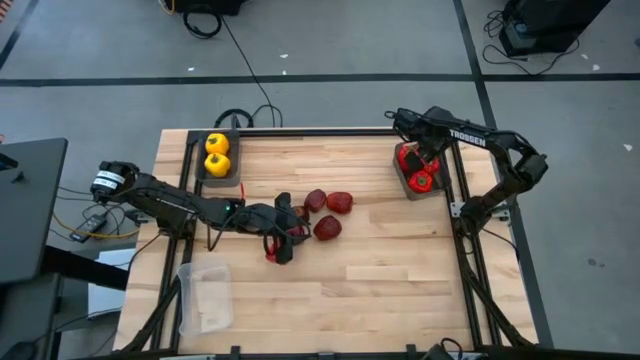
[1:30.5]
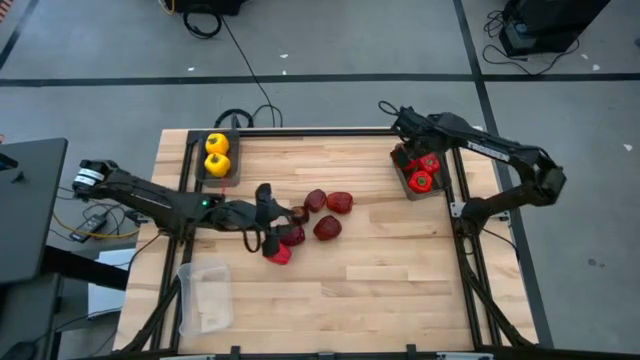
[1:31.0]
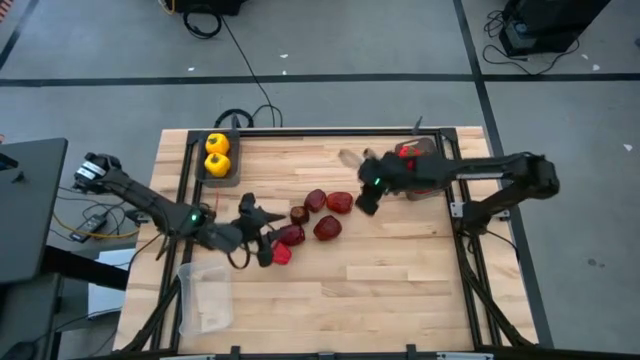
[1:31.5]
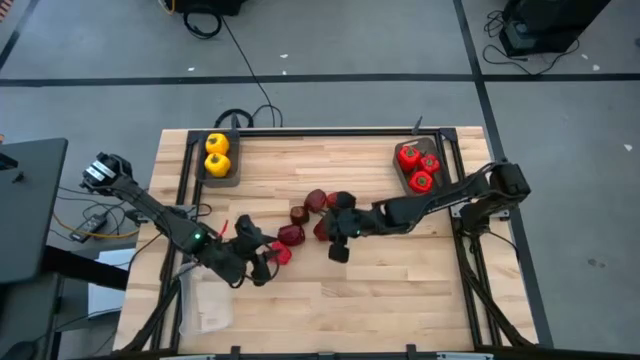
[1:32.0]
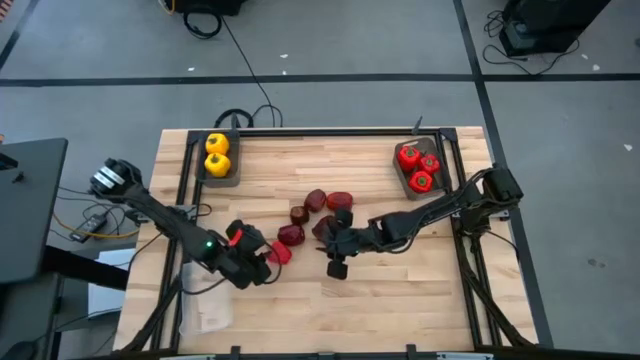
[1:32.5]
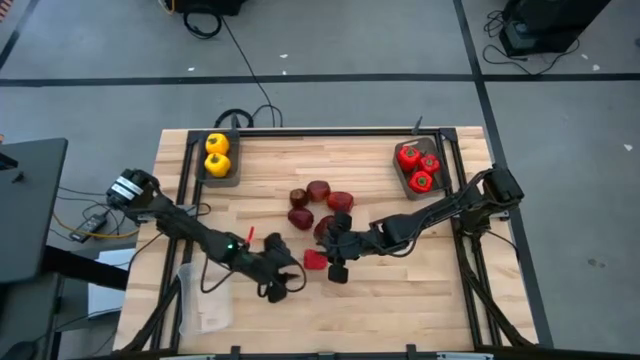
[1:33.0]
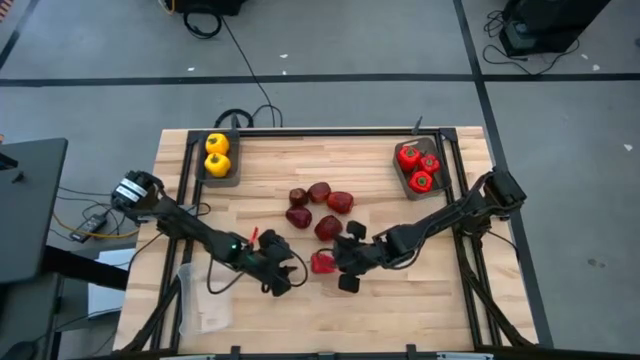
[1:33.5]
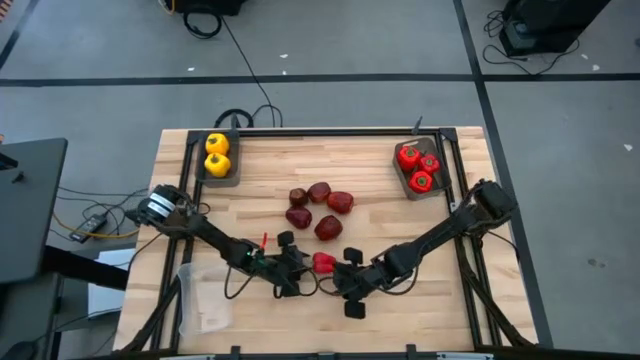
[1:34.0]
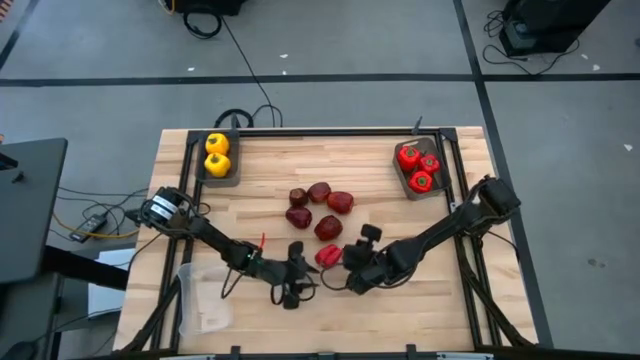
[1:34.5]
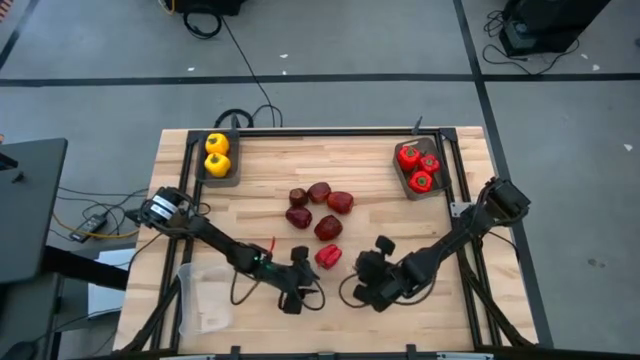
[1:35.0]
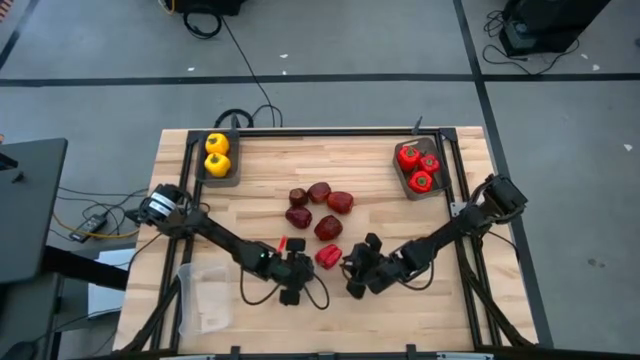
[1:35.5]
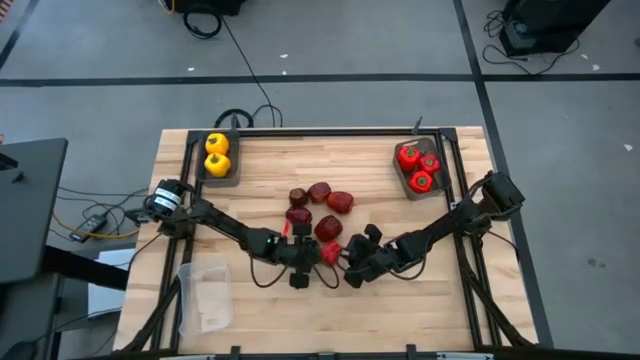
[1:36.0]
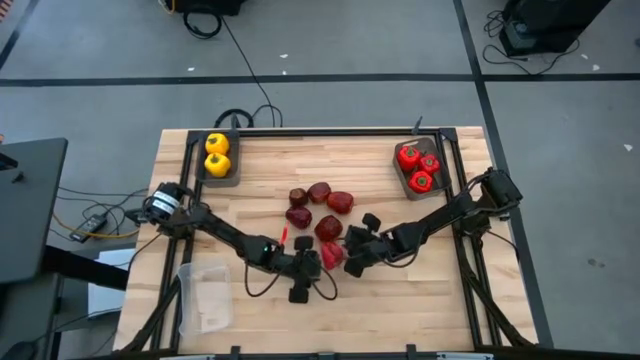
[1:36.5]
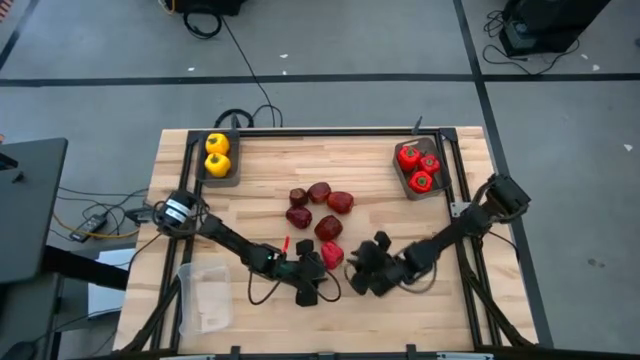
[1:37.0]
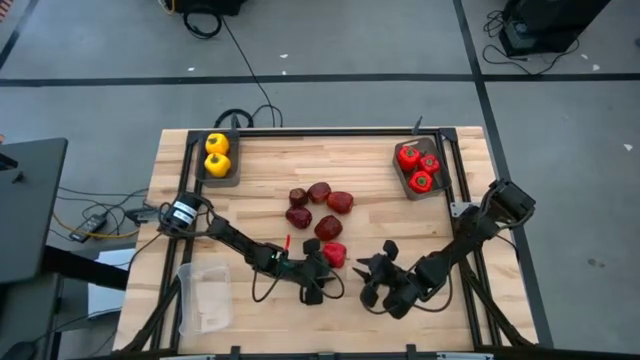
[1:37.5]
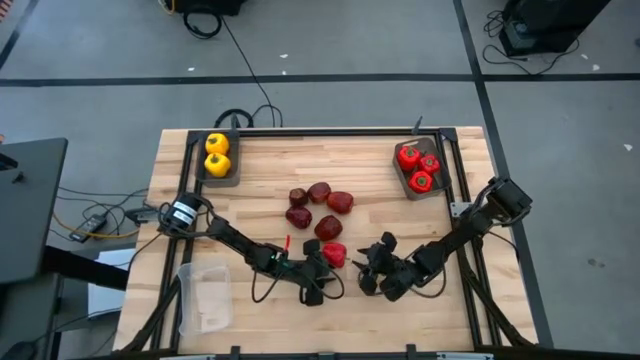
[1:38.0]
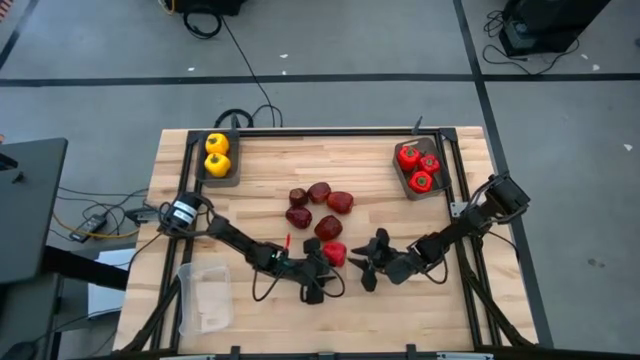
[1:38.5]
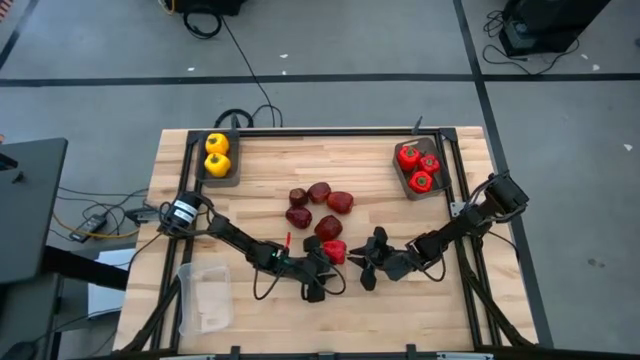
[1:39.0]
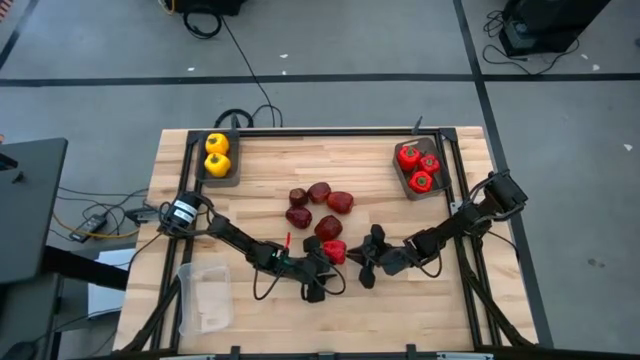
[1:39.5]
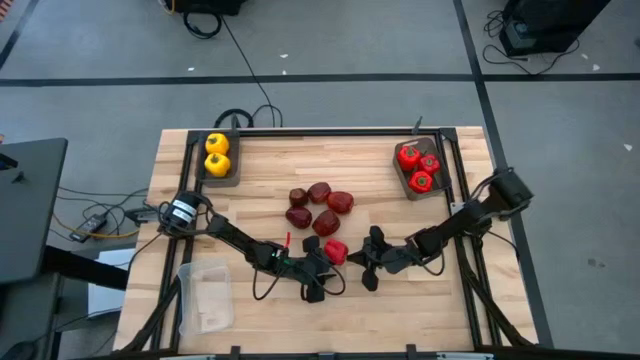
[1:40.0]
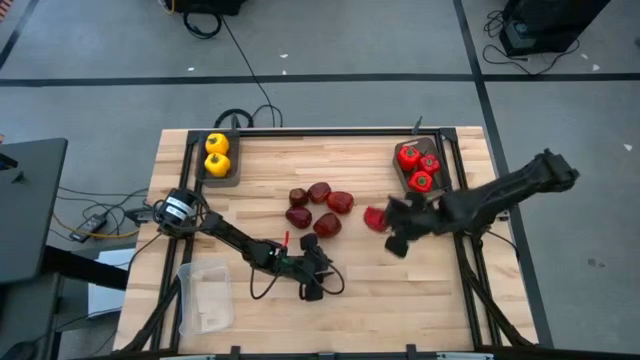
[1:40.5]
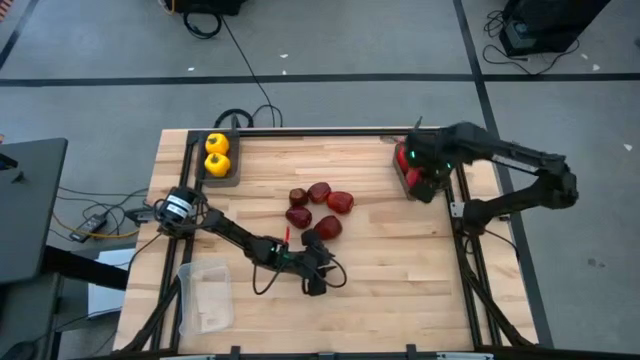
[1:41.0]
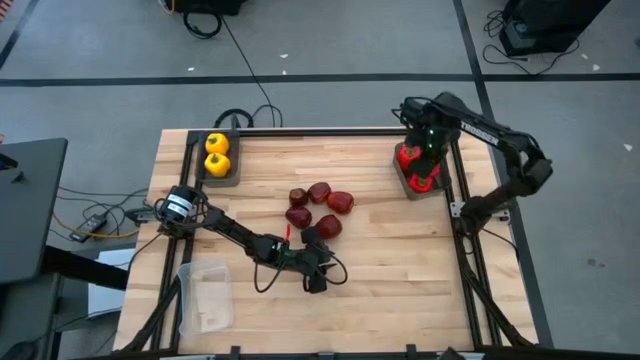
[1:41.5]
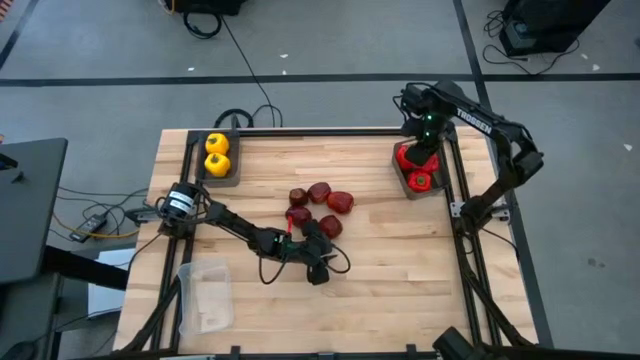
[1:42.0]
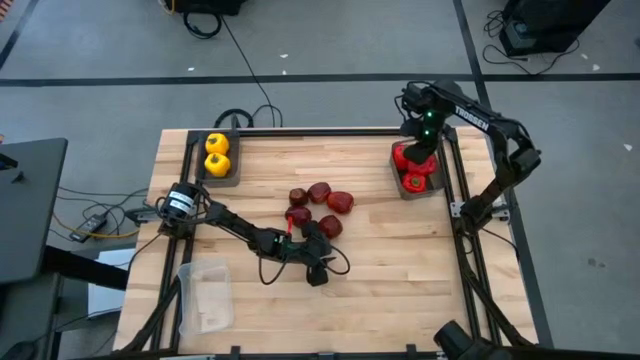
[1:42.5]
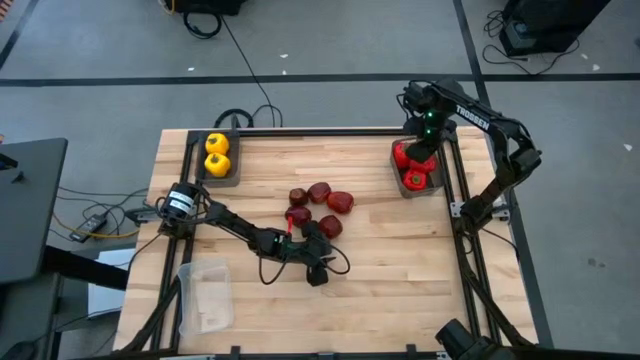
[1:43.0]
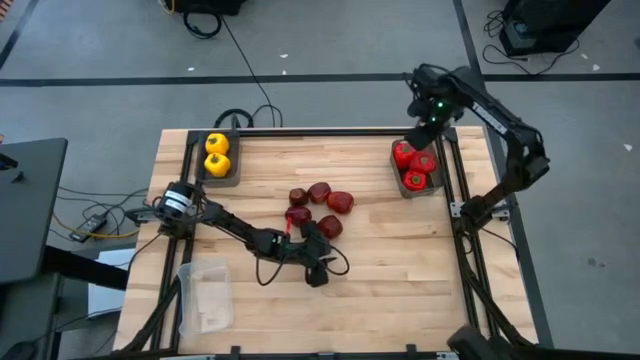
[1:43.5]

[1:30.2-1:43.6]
Task: Sort produce into baskets
Put the red bell pepper into the right black transparent bin

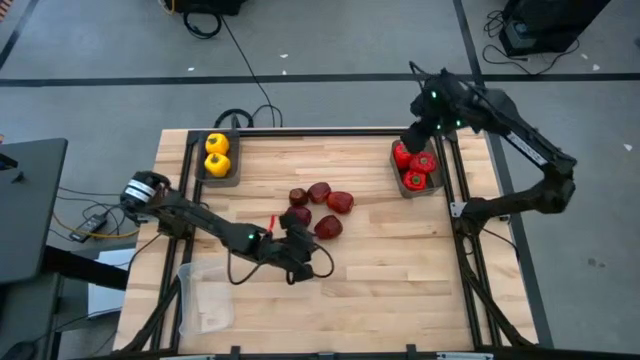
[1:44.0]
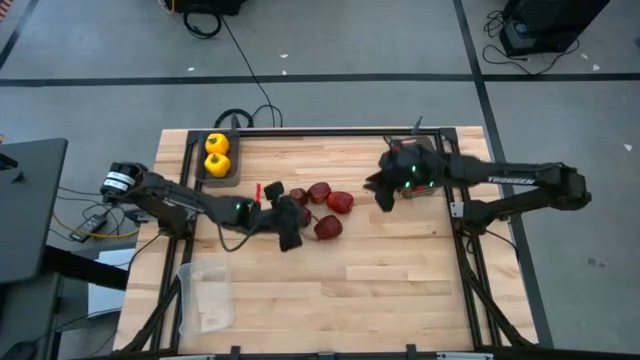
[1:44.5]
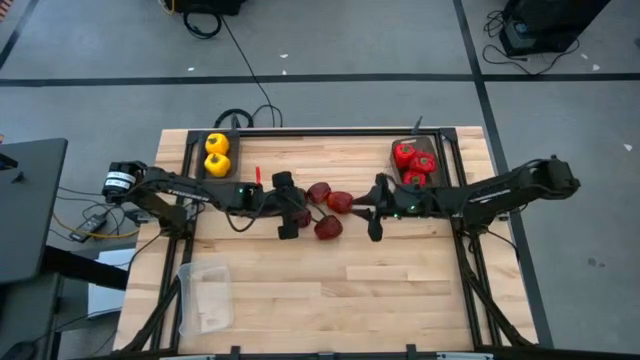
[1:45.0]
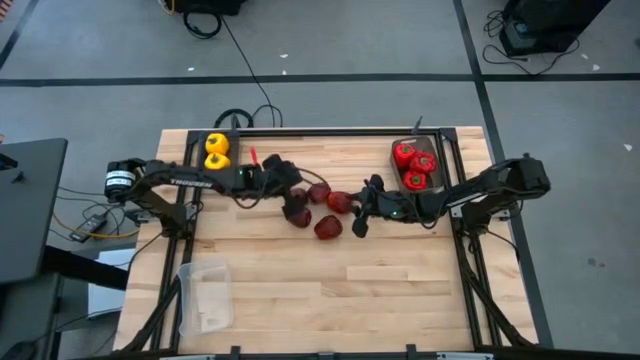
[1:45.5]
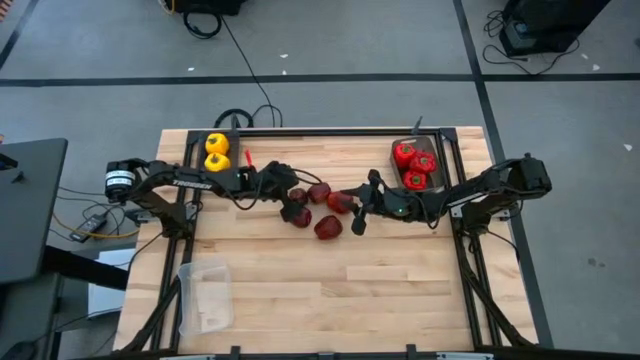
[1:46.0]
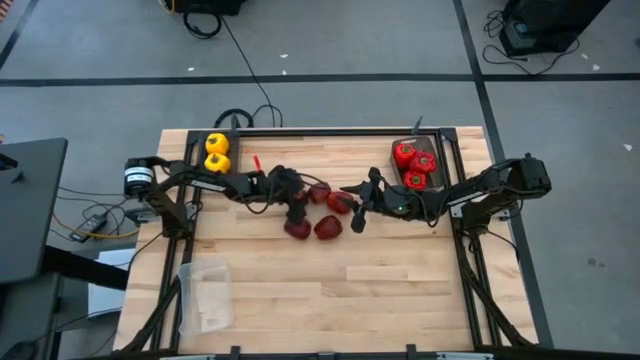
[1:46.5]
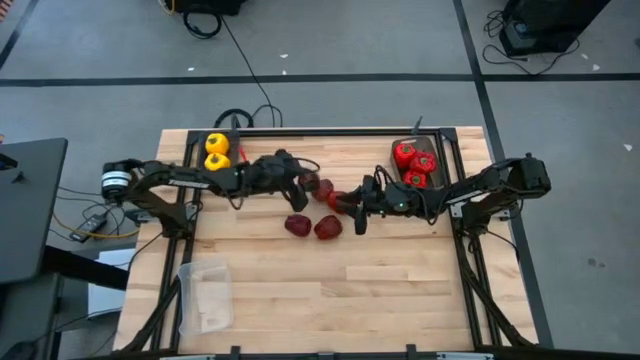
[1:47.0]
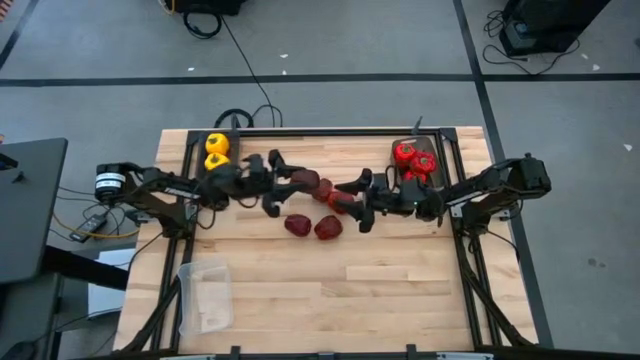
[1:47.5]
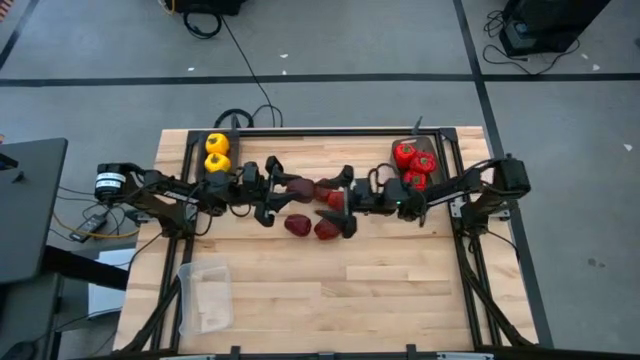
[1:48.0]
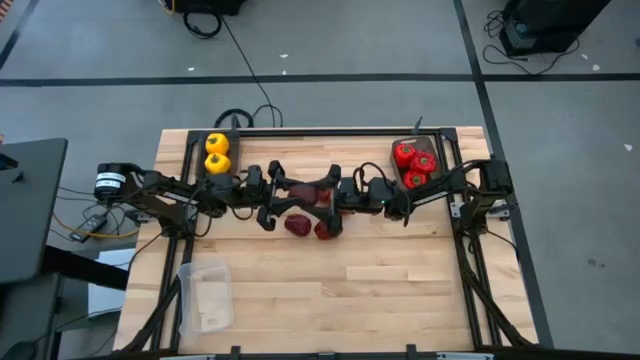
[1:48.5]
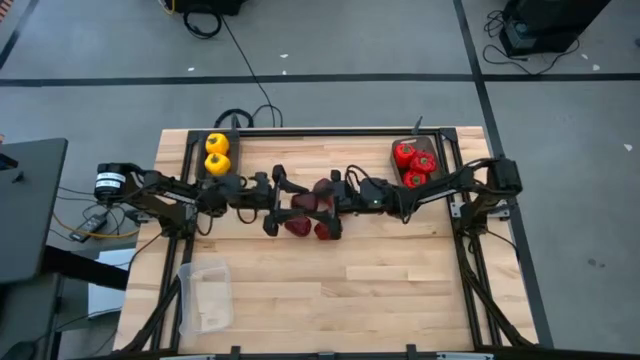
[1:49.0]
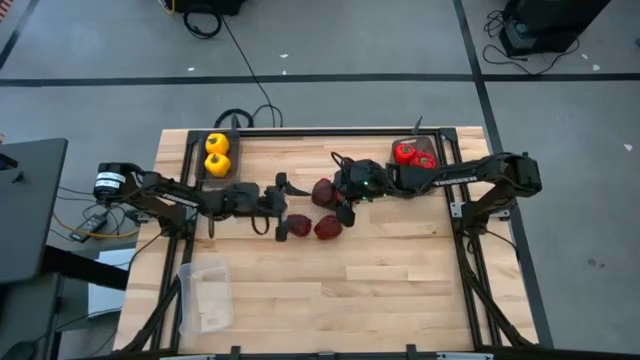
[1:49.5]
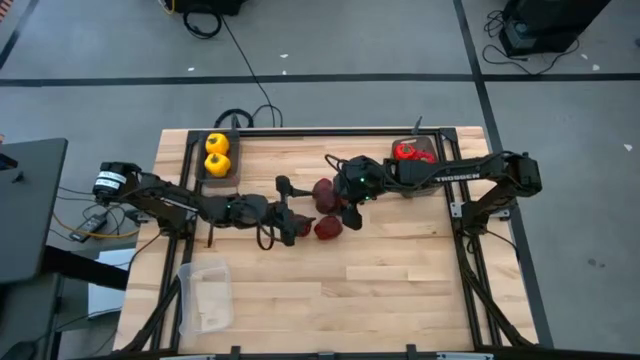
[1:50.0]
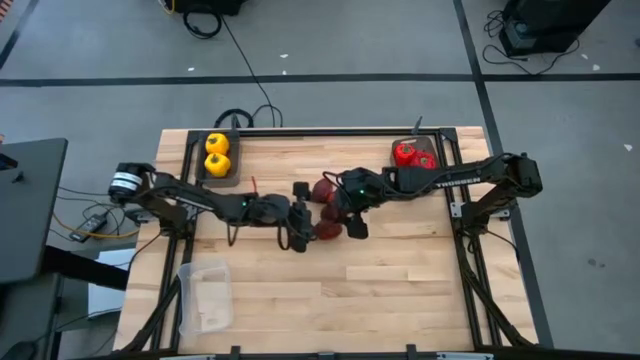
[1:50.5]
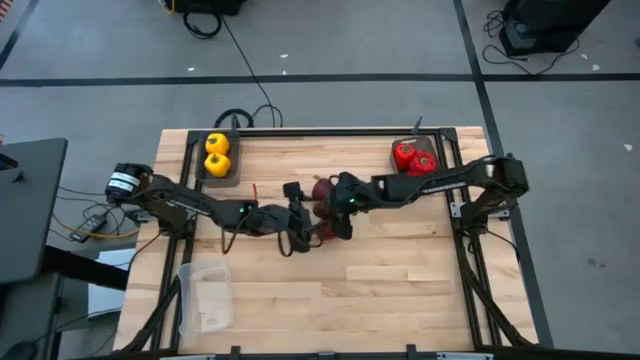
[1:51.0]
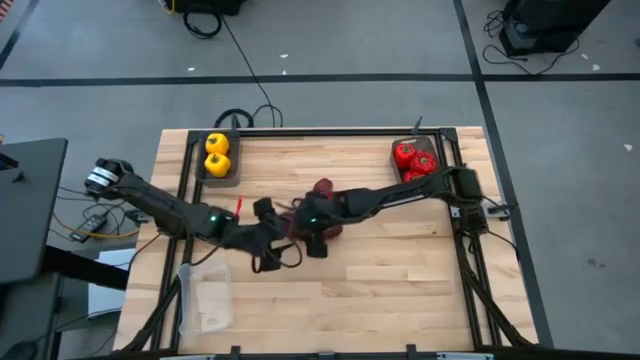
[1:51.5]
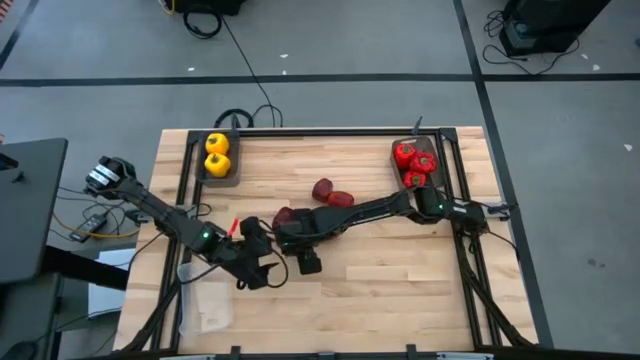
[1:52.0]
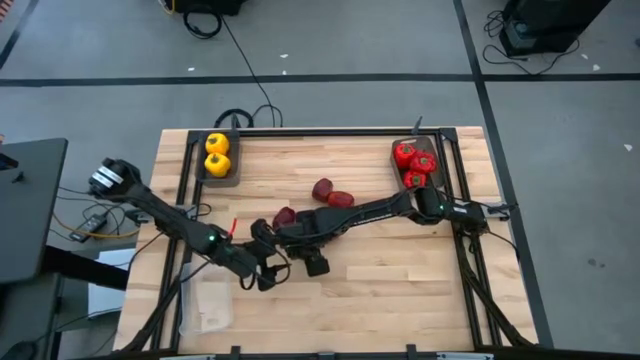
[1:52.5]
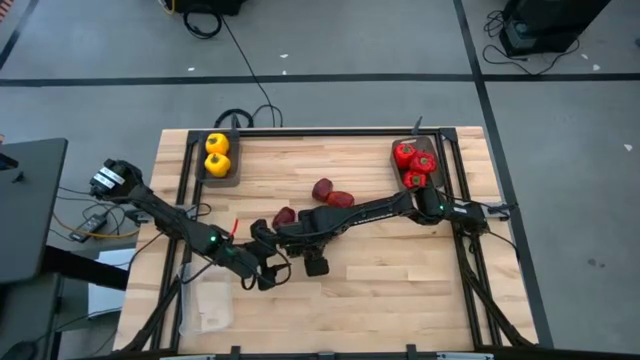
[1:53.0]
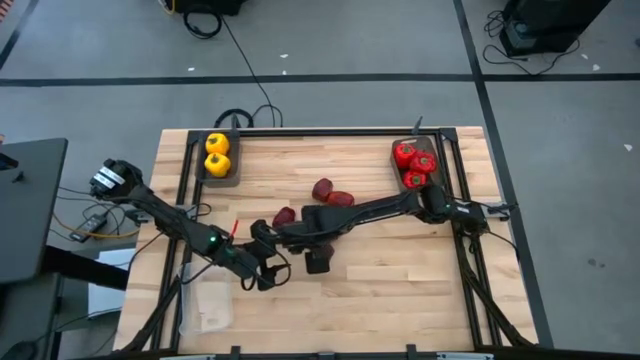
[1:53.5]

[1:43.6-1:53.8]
Put the red apple into the transparent bin
